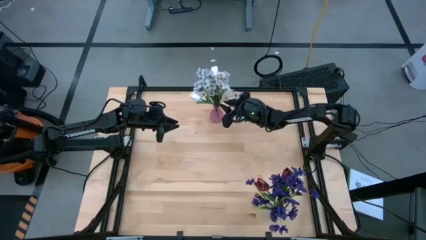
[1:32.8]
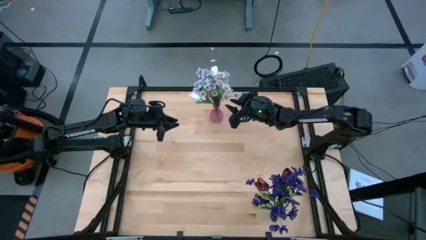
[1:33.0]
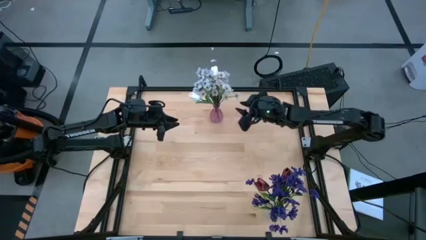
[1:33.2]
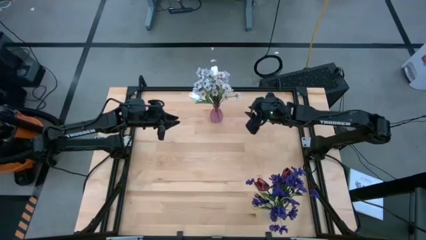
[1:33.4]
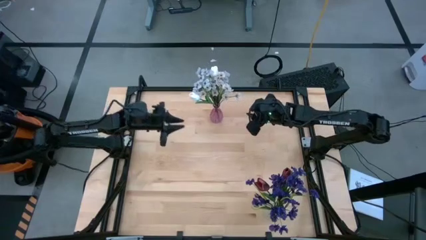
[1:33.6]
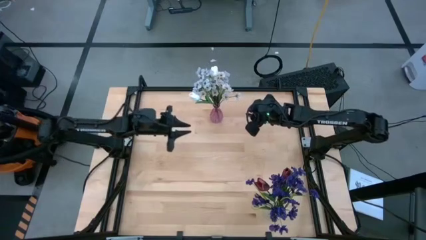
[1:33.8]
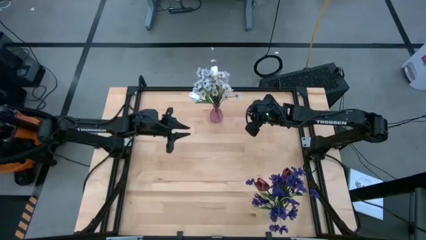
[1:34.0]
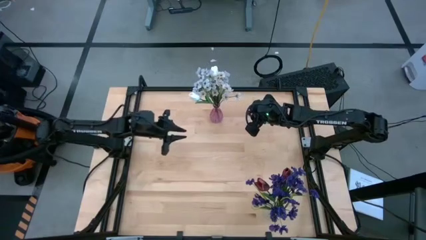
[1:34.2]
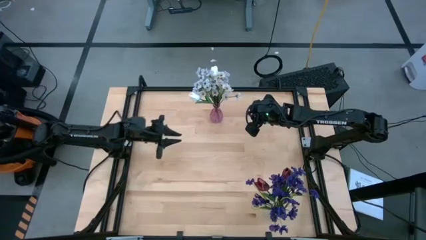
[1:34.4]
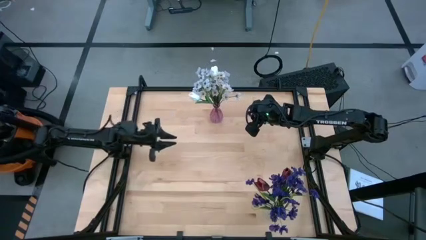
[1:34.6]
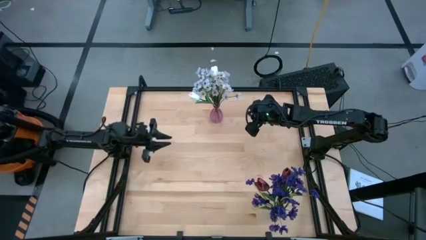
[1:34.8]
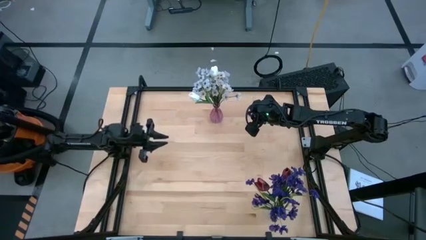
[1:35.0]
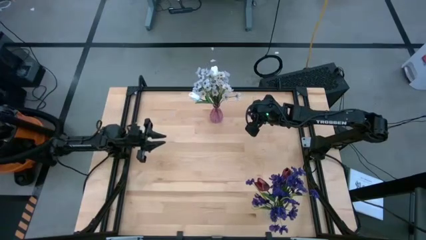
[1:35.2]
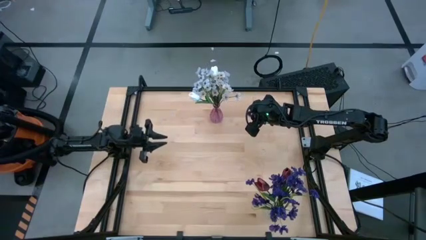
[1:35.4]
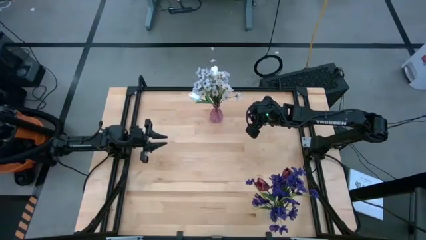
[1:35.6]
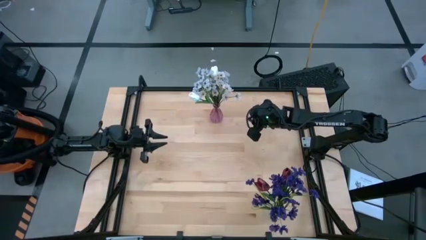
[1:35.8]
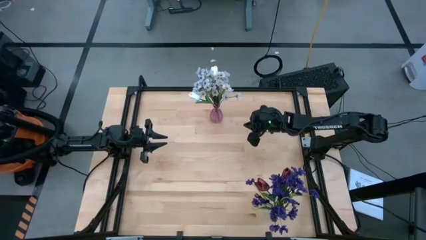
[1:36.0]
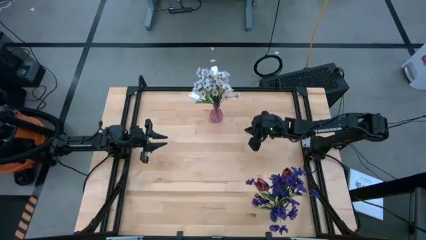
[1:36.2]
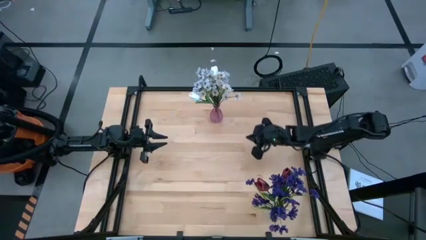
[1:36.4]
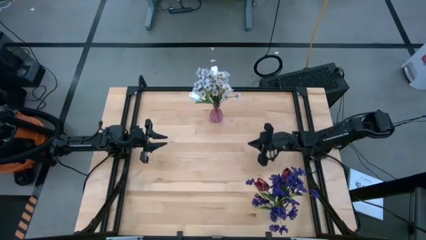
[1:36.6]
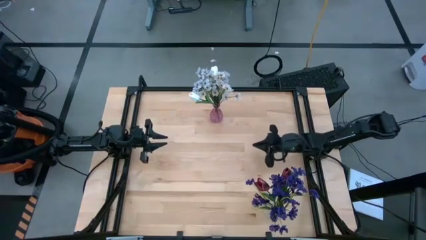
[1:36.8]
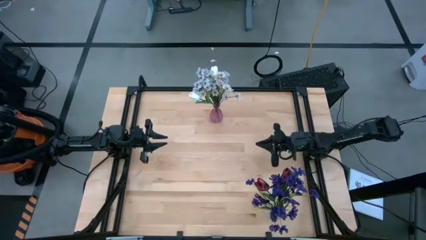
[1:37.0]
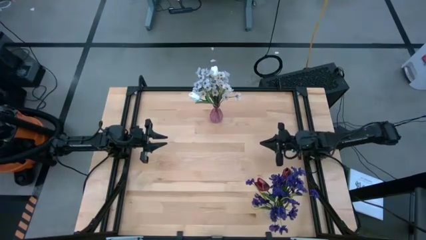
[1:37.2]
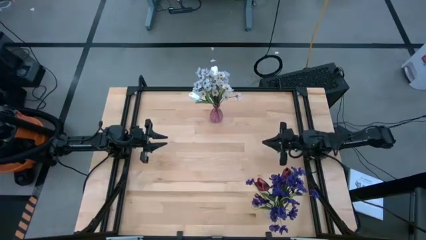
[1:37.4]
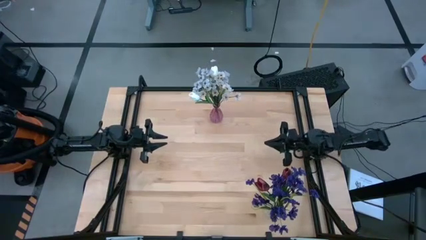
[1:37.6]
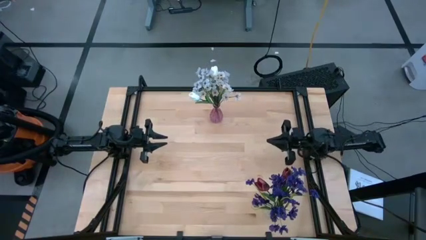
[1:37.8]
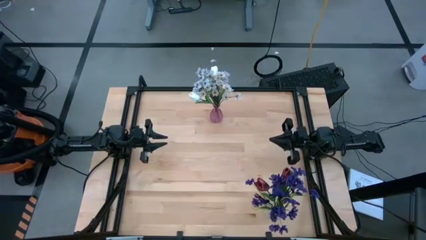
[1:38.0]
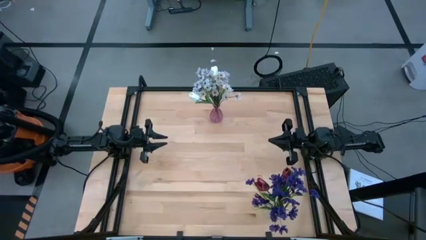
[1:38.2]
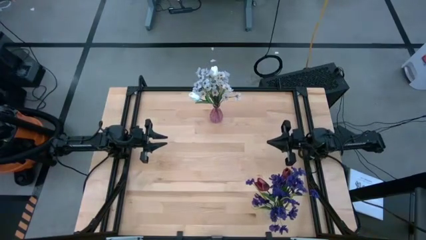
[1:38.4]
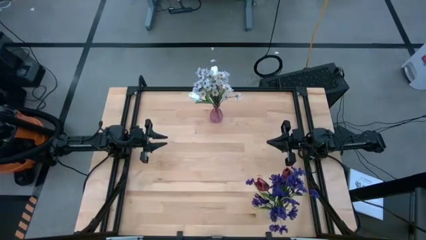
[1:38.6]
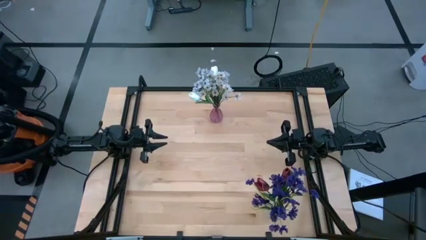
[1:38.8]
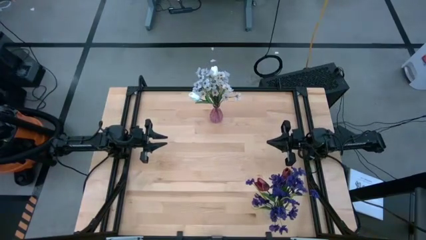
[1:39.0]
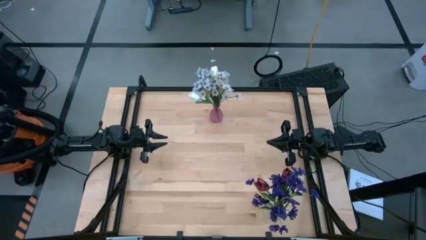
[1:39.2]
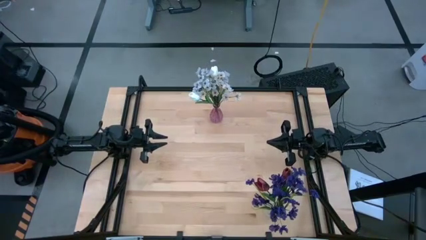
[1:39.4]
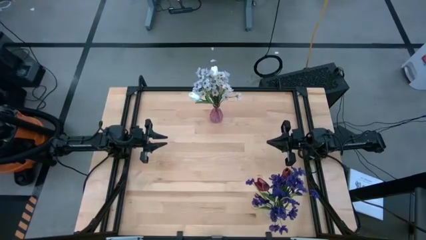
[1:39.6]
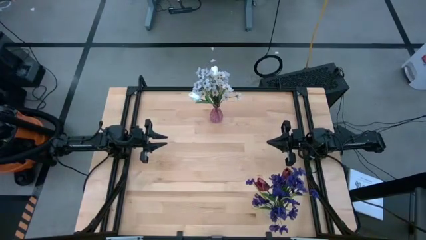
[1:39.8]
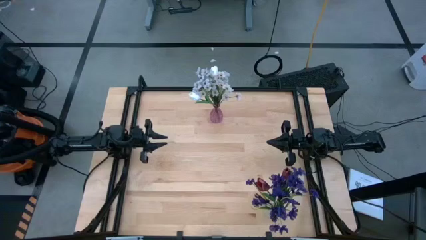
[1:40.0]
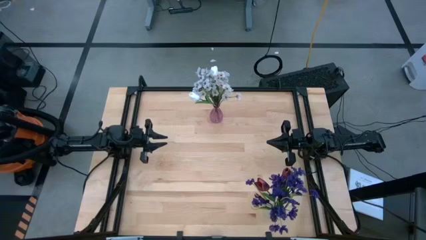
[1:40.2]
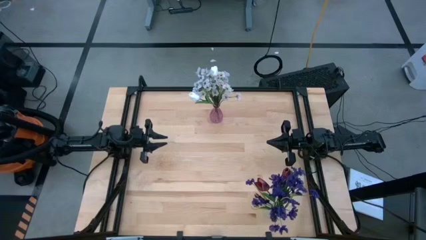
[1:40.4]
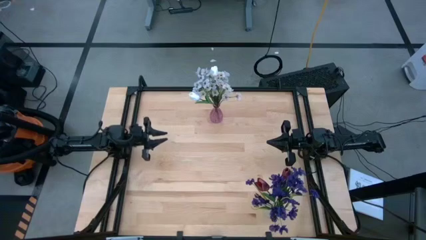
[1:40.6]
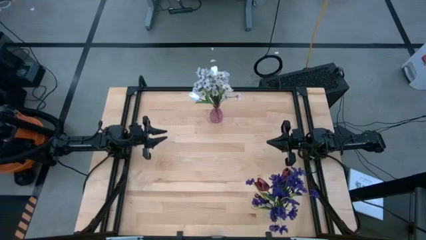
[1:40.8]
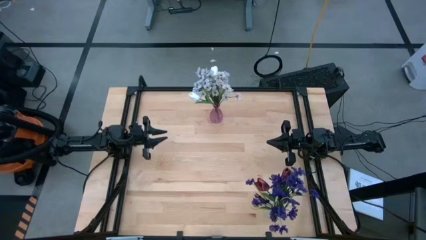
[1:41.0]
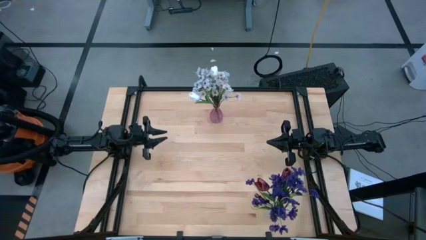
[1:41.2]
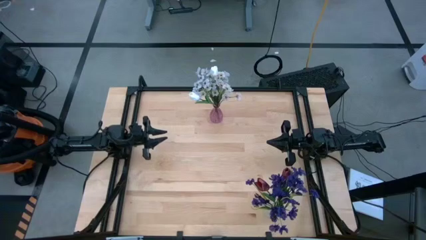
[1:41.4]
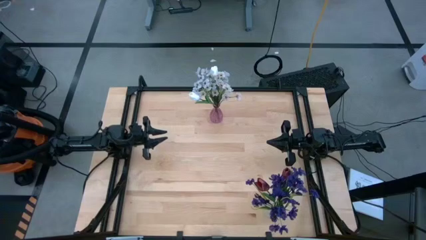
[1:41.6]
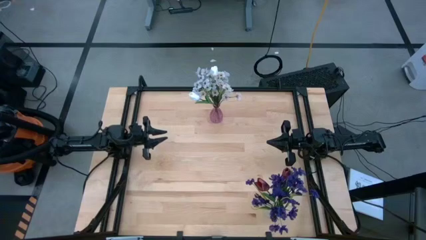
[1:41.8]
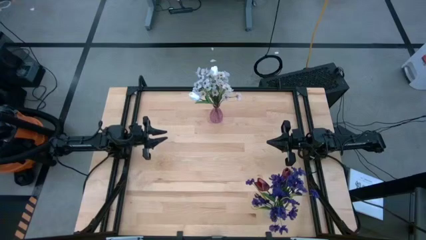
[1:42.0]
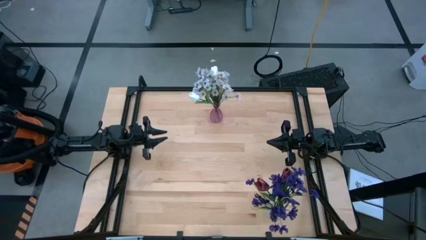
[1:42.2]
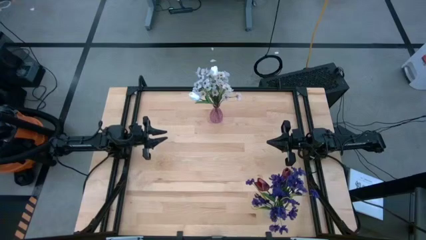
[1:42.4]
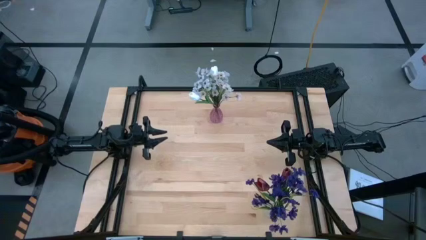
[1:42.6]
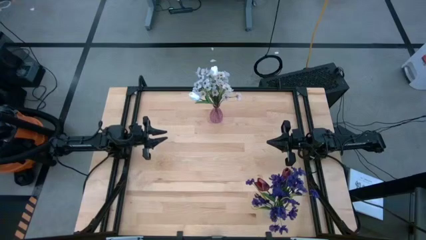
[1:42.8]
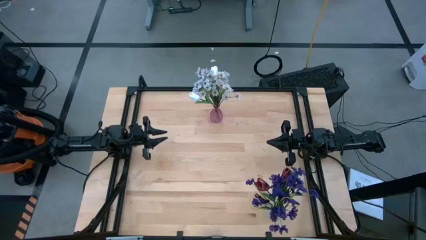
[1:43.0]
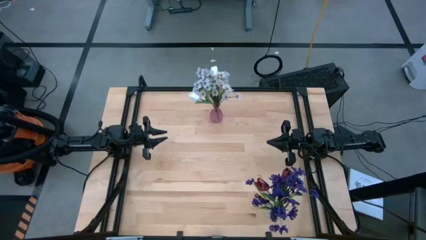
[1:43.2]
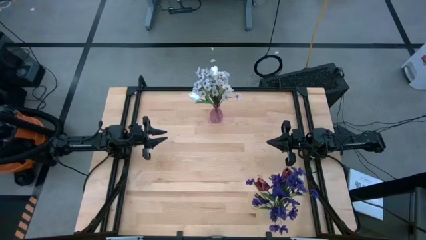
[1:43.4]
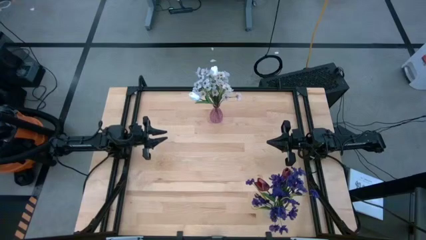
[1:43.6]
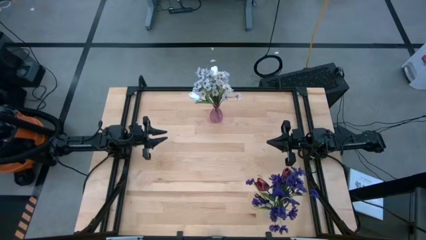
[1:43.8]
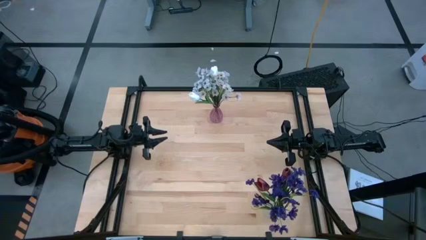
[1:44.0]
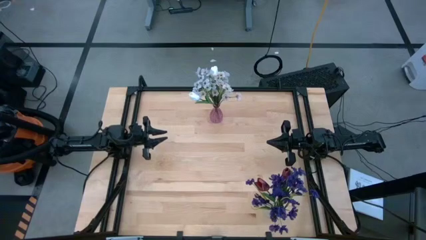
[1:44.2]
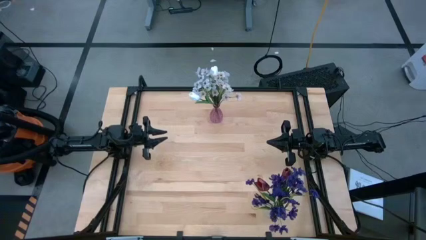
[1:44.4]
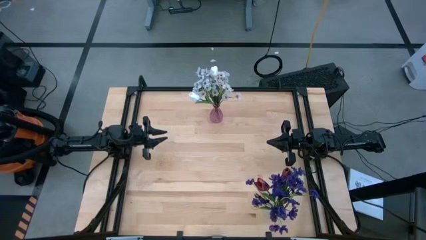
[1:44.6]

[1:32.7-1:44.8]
Task: Sort flowers into vase by color
Return to Home Position

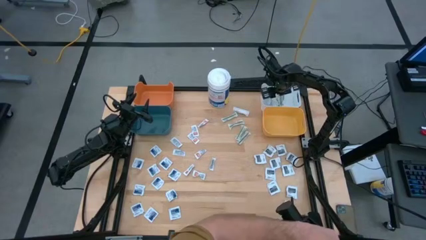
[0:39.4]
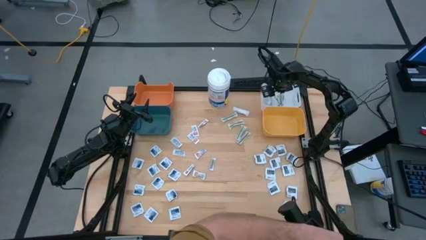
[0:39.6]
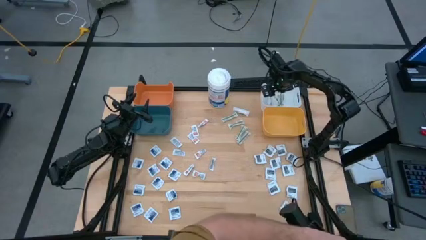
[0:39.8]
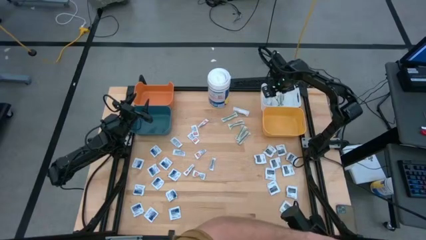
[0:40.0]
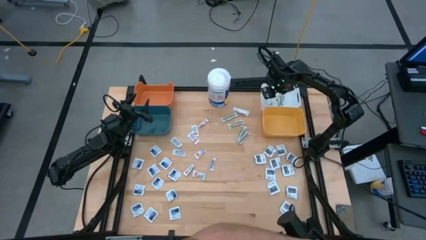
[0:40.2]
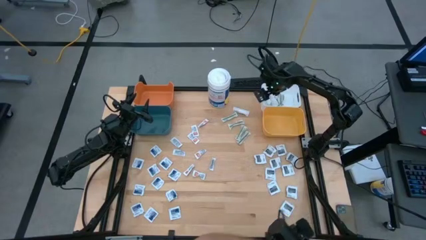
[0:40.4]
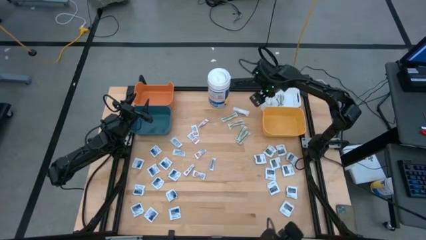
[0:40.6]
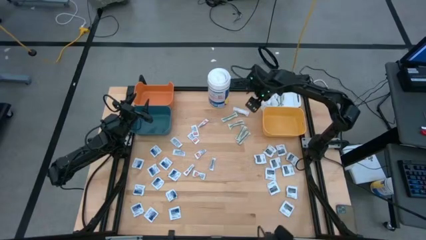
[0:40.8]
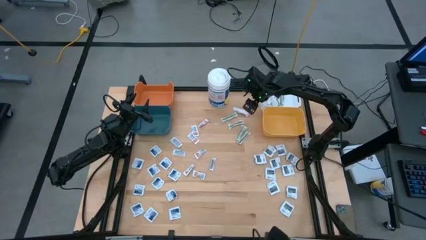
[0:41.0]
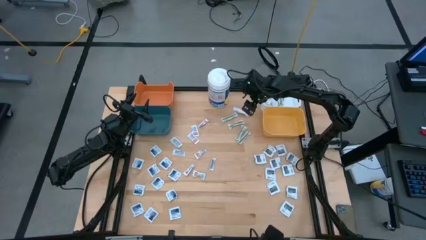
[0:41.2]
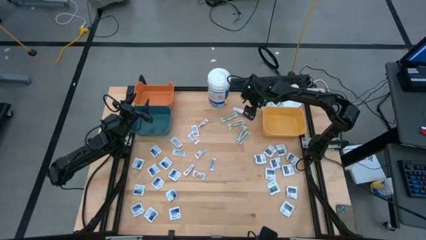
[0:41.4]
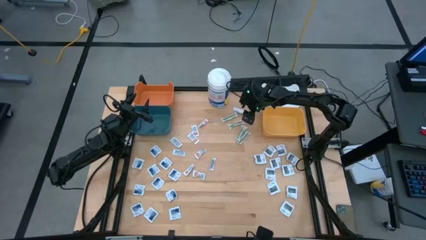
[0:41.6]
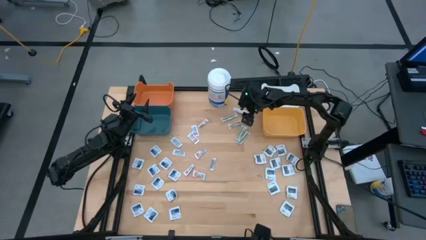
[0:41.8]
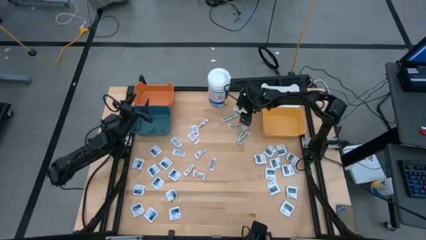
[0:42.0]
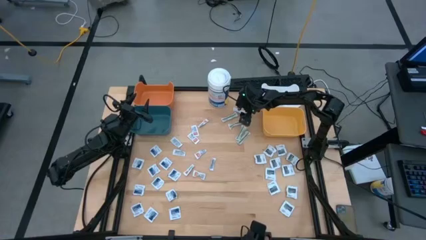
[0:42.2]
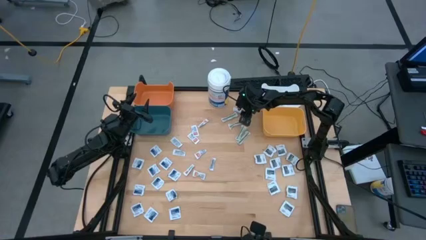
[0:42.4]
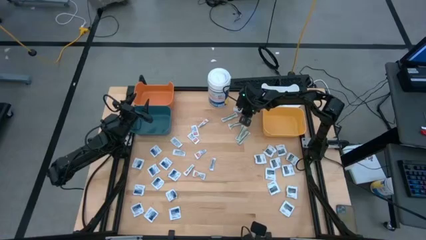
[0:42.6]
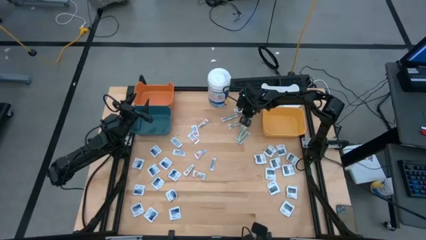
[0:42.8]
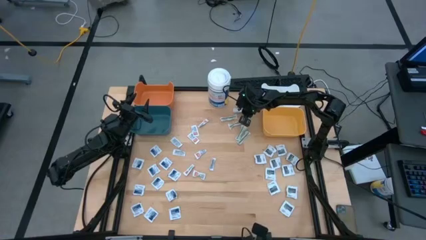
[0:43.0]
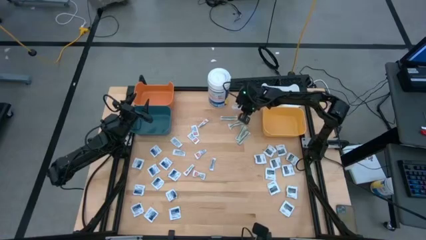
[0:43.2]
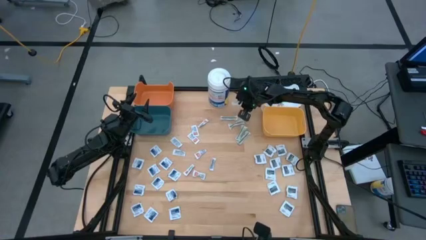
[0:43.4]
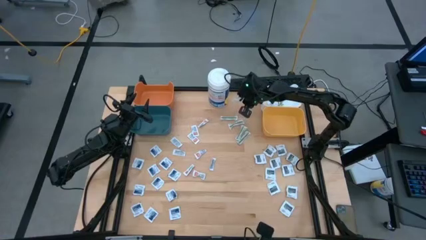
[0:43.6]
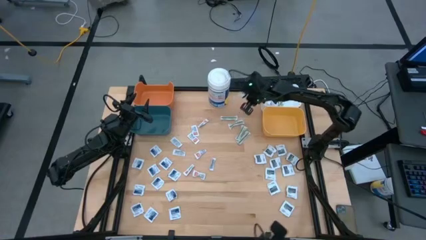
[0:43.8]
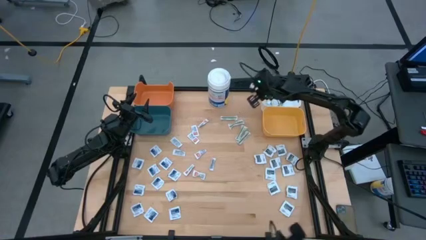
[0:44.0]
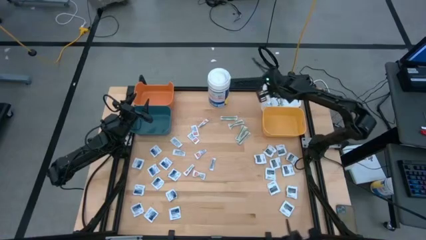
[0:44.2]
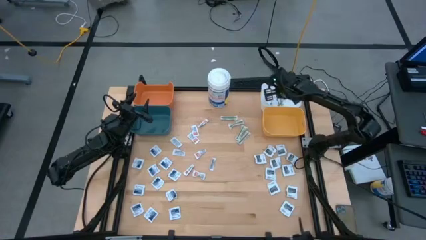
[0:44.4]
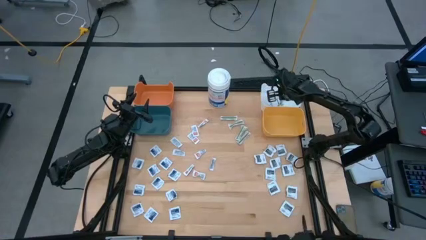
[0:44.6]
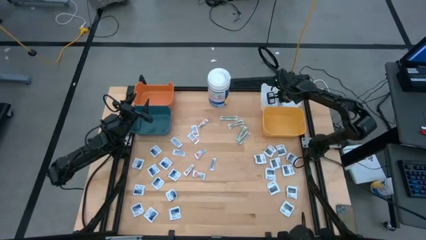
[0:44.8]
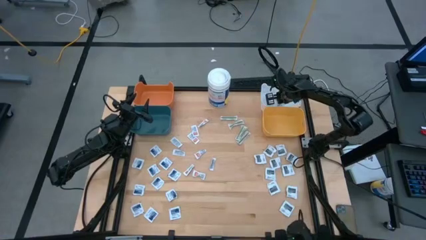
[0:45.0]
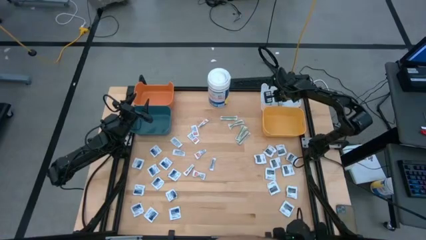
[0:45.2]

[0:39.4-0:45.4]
Task: Pick & Place First Aid Supplies
Put the green bandage into the white bin
